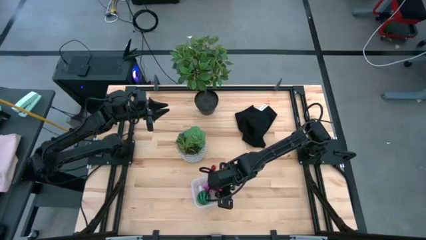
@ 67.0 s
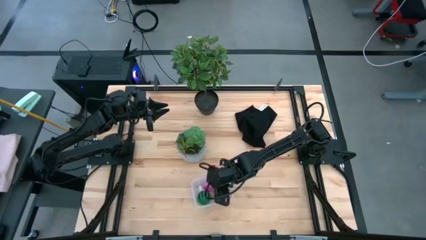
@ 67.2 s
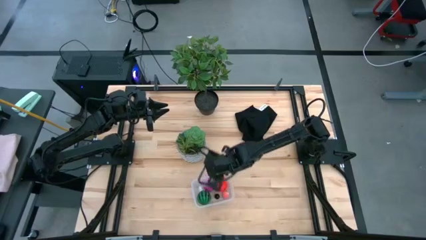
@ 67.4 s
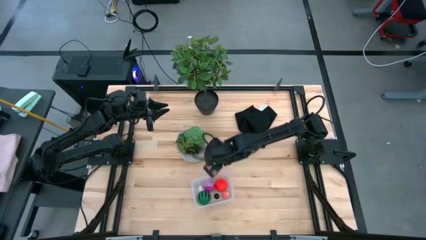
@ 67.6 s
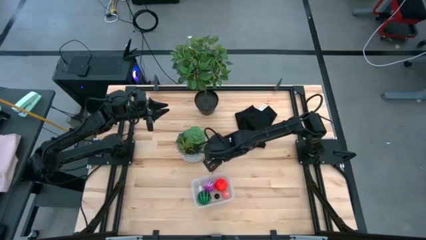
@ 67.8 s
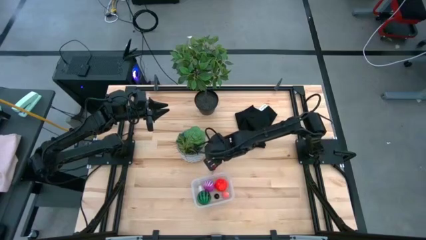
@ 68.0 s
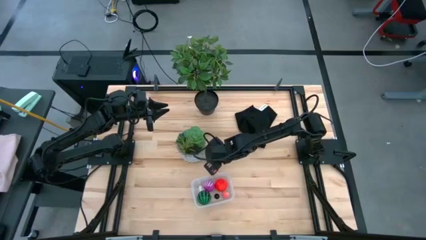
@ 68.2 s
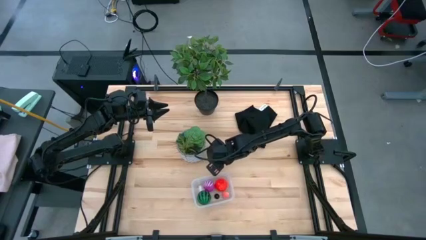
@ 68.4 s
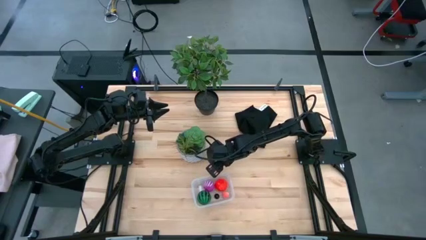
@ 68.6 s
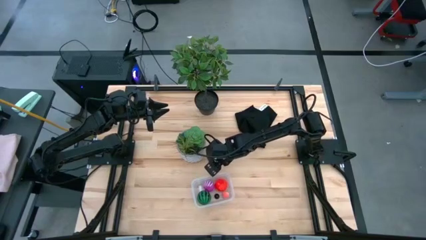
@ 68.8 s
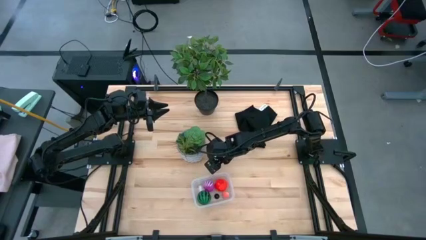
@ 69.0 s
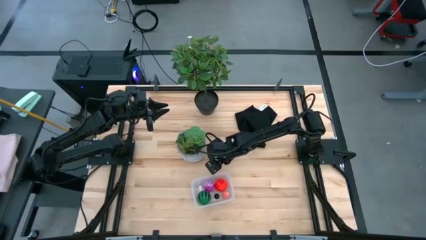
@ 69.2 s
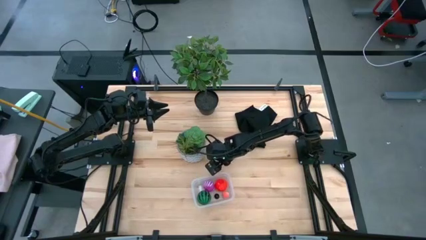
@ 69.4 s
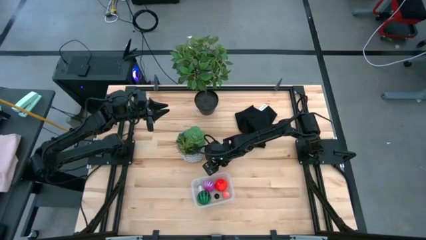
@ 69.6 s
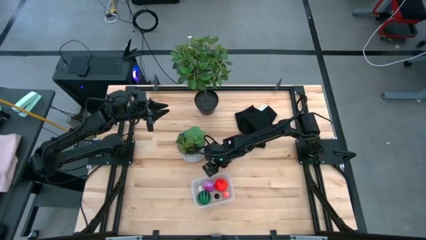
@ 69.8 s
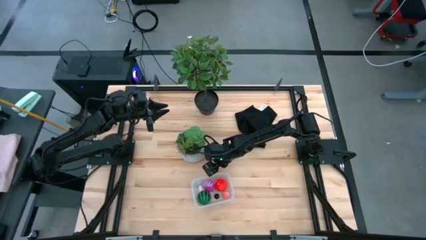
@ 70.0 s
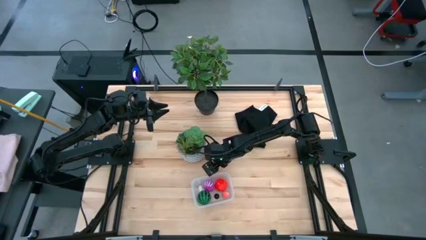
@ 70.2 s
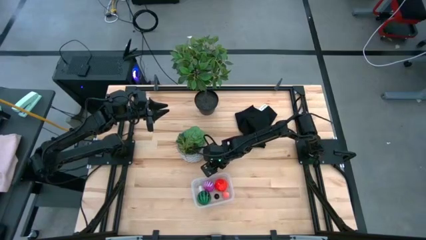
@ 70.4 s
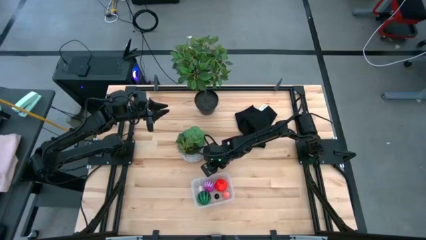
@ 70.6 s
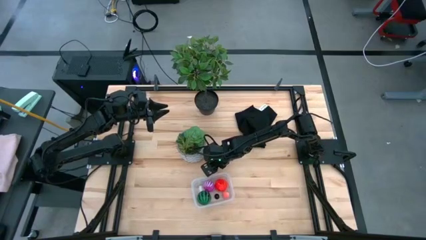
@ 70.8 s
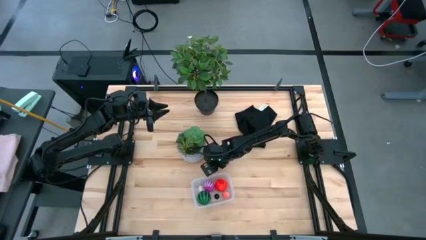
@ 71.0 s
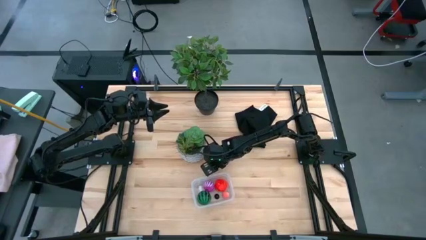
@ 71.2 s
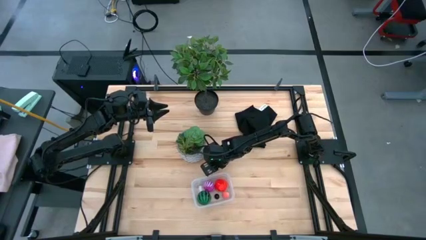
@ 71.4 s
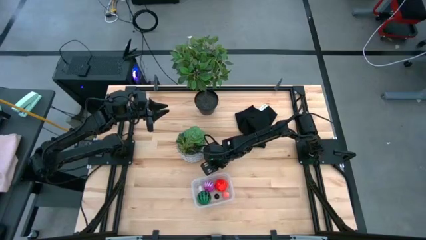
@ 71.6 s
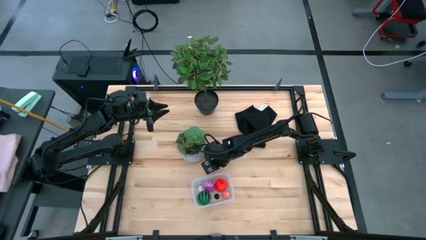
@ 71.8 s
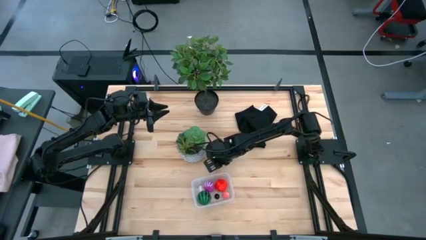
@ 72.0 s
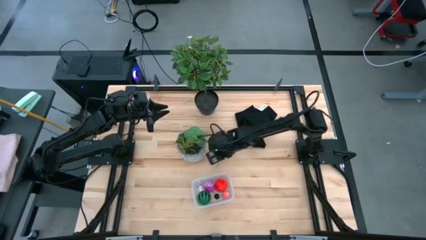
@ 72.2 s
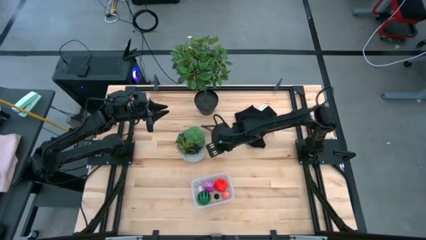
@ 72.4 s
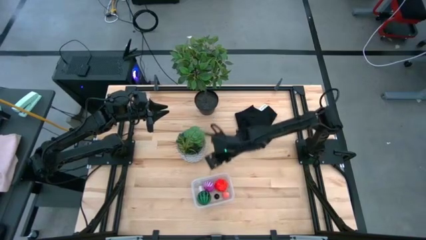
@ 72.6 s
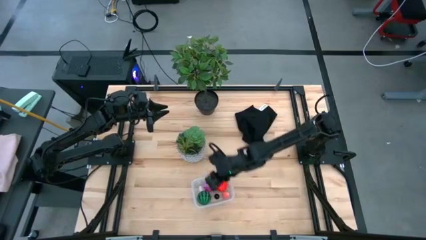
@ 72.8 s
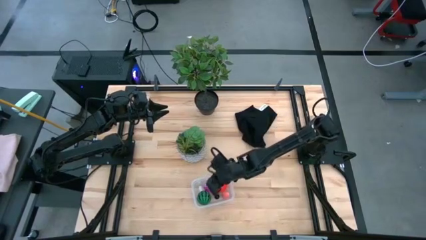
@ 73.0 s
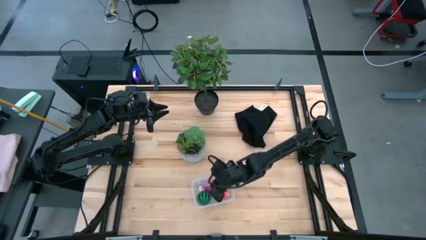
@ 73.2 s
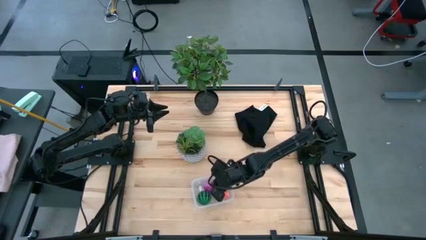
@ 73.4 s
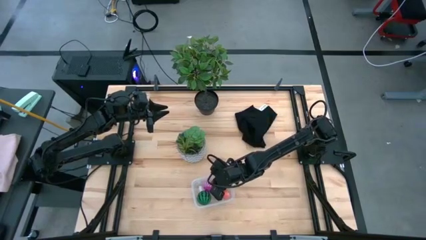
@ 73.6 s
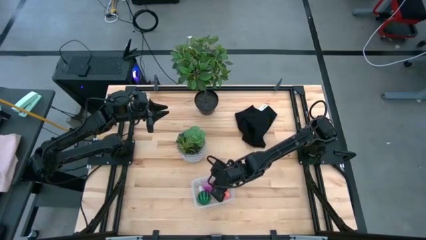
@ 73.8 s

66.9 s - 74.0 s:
Task: Pick and placing Produce into tupperware
Put the red cherry into the transparent bin

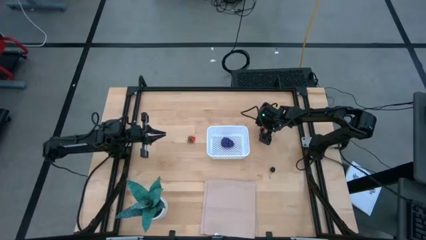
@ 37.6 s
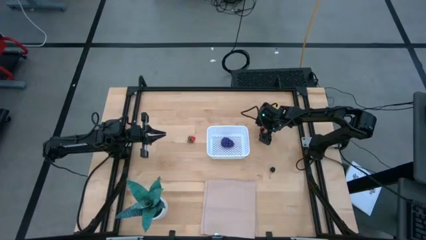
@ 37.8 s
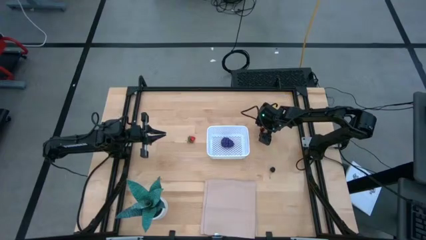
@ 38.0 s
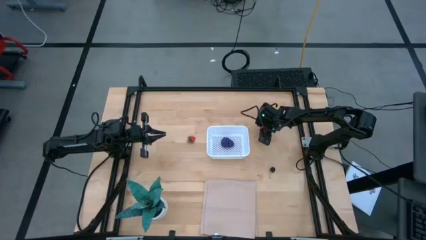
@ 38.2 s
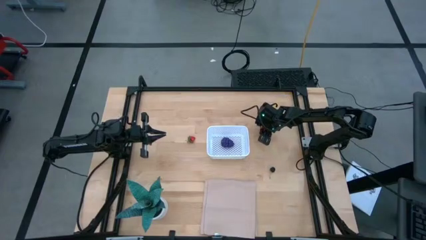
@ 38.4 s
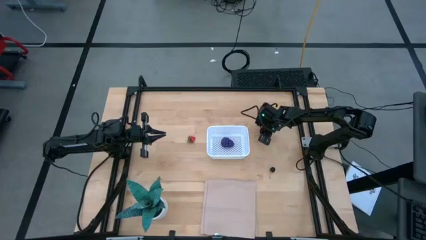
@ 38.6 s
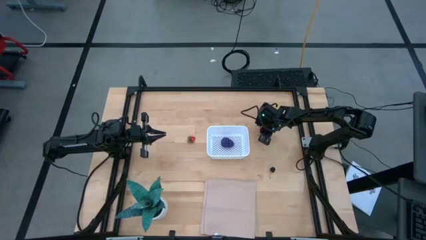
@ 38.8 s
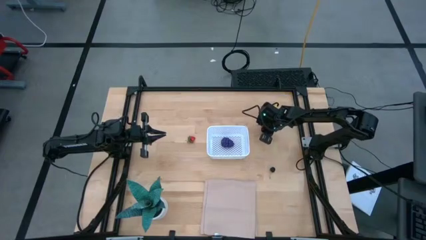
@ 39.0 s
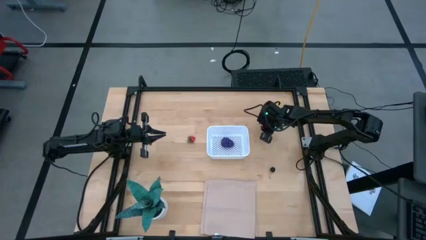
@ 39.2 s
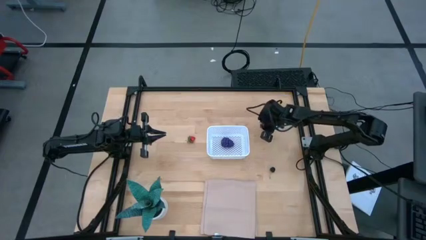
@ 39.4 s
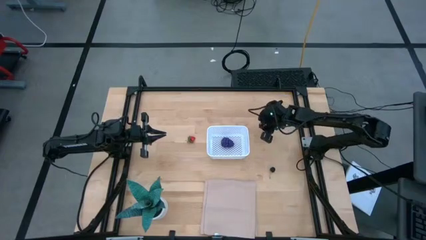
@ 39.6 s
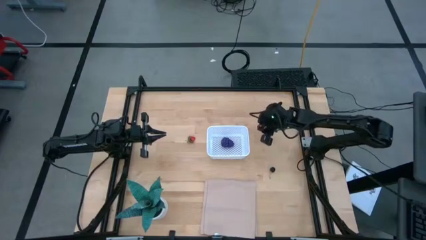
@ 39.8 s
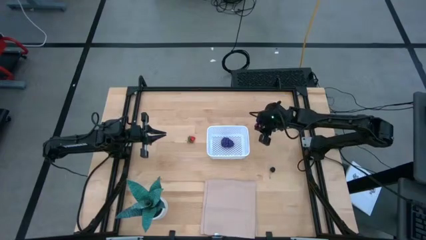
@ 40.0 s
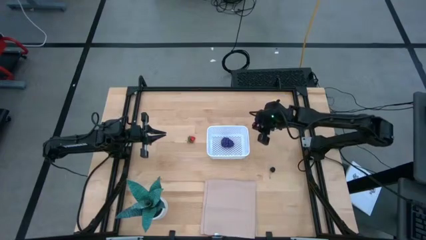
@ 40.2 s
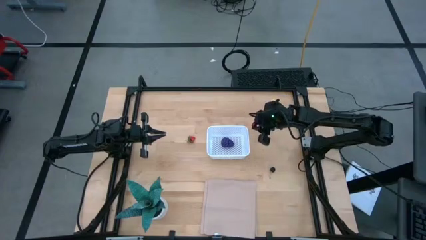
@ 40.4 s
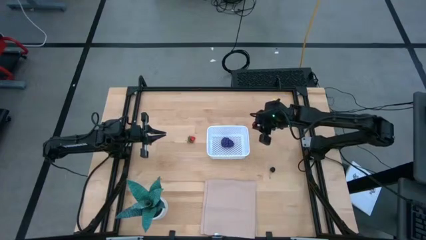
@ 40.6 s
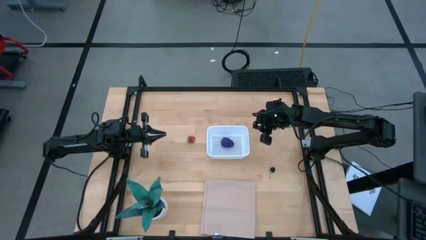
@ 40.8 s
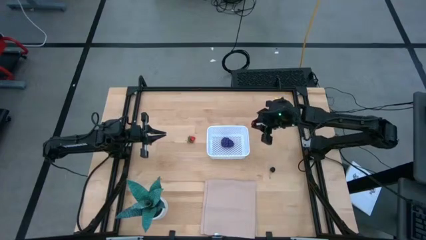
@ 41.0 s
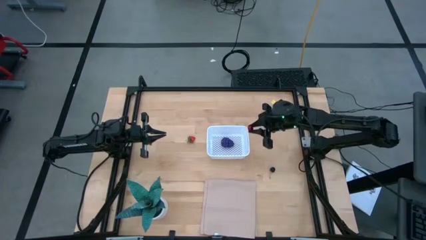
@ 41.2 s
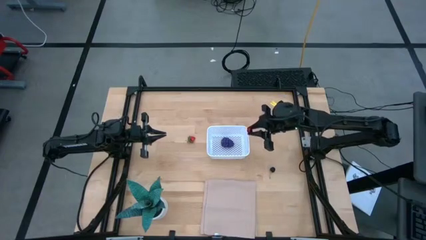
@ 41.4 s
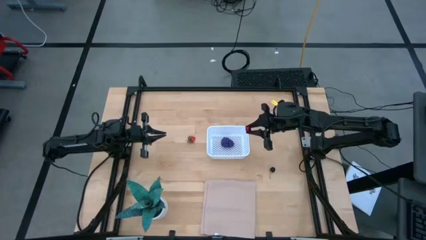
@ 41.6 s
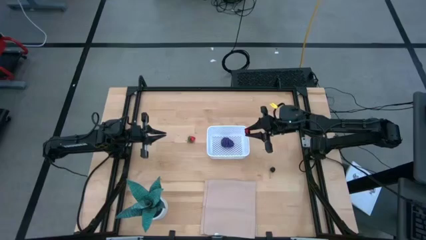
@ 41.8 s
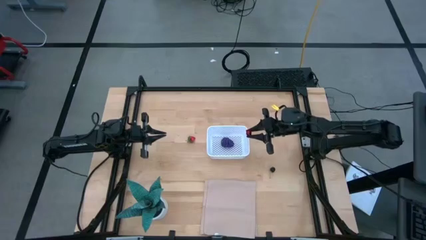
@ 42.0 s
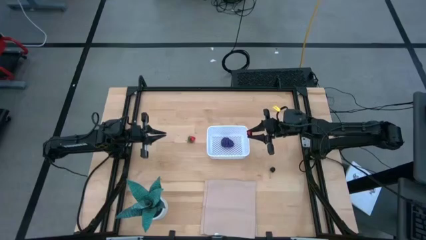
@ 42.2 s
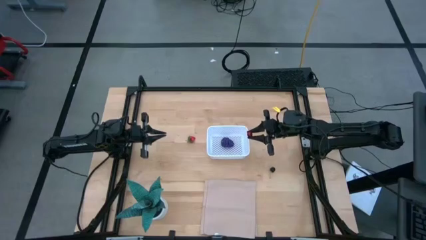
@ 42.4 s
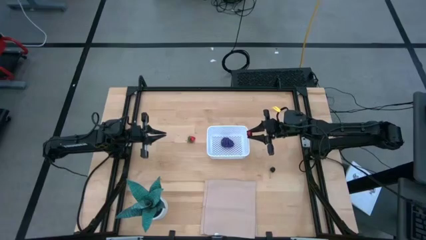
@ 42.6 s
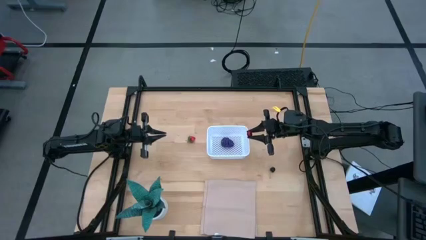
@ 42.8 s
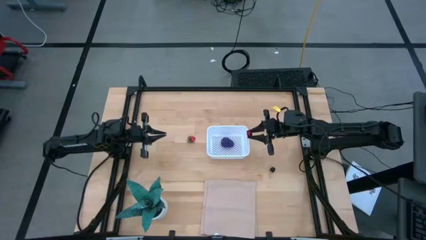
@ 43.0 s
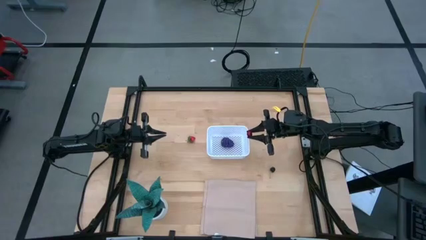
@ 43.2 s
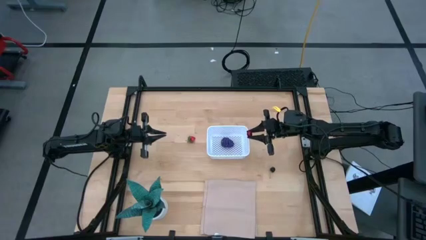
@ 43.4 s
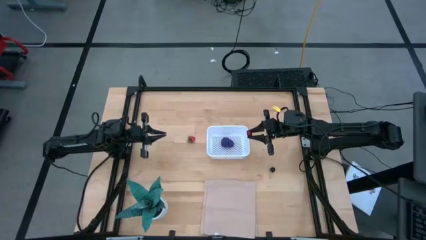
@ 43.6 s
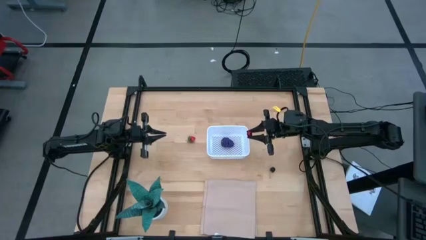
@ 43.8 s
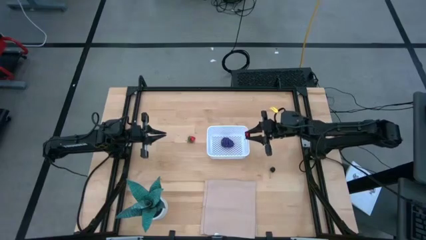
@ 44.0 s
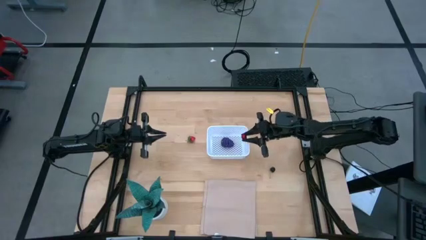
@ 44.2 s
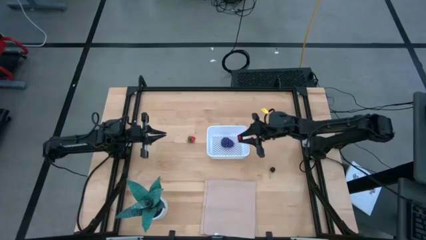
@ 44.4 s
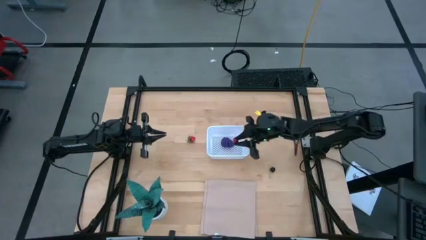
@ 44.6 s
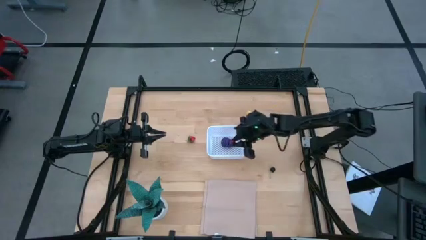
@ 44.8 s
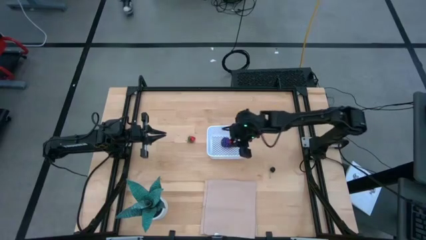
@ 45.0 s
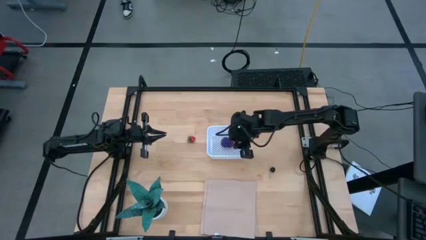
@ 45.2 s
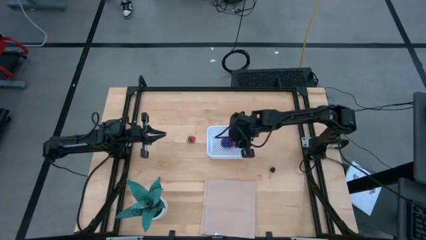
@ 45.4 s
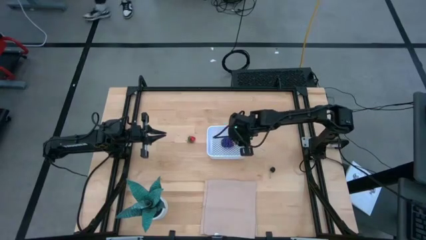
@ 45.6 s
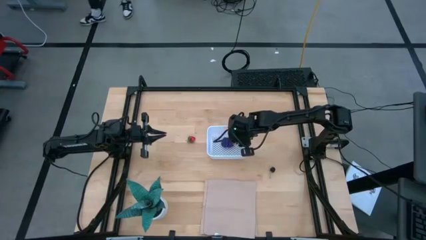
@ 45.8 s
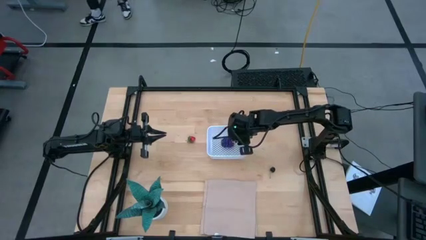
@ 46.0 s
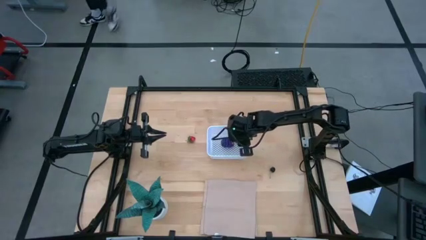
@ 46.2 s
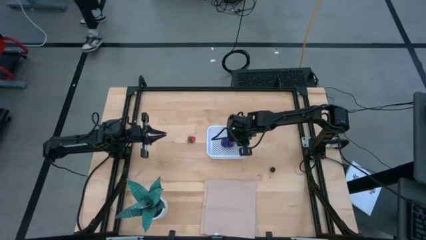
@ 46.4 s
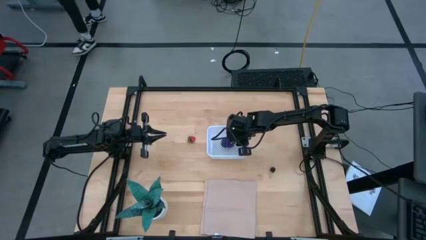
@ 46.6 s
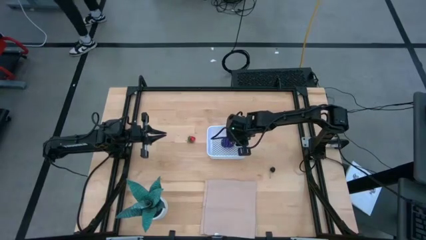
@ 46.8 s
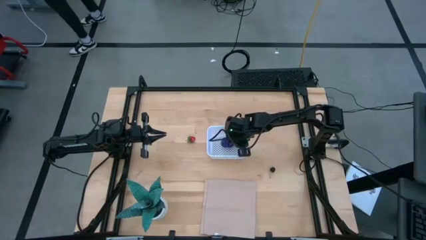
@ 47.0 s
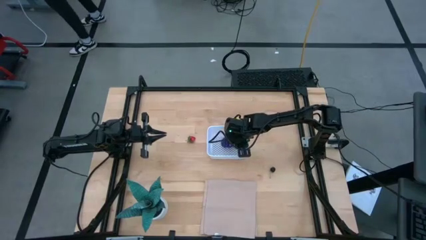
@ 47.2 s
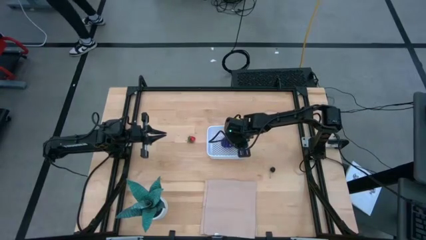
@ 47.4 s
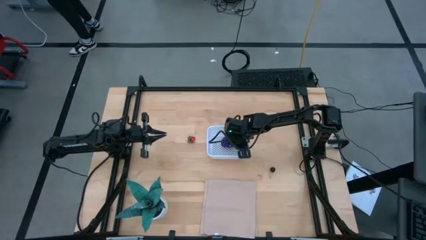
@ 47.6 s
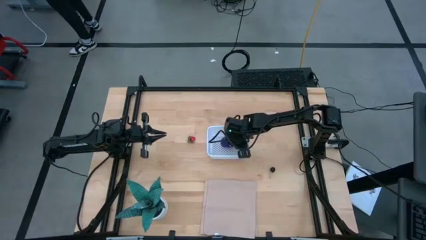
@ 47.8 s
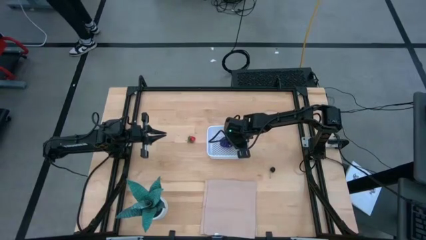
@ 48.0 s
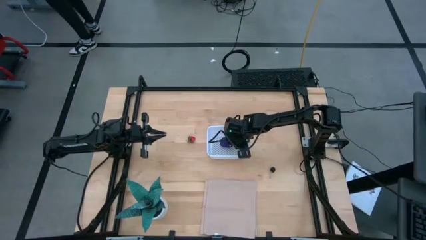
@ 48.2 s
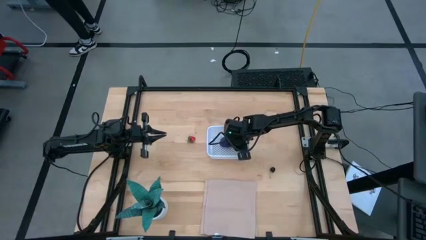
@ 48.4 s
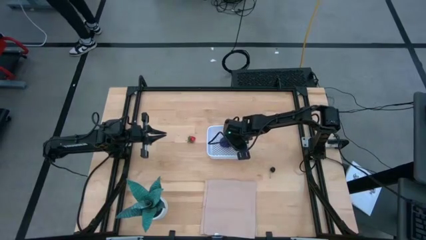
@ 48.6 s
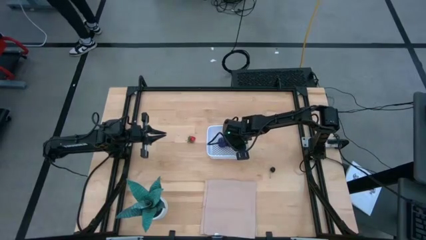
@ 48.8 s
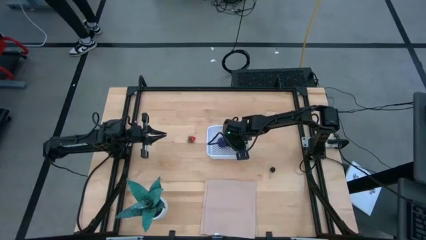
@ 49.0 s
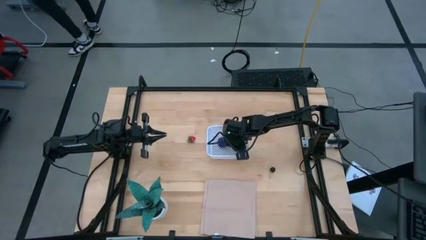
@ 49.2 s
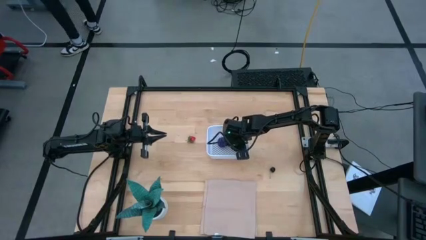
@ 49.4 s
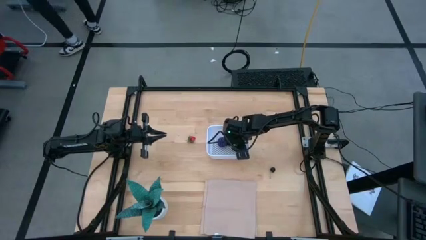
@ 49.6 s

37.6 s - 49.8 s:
Task: Pick and placing Produce into tupperware
Put the red cherry into the white bin
